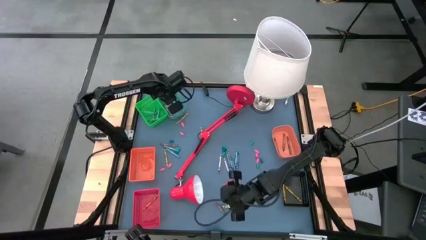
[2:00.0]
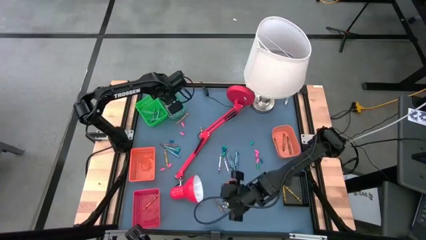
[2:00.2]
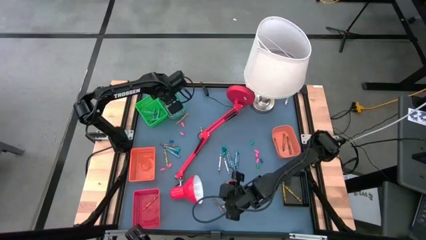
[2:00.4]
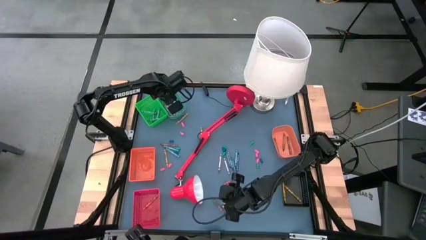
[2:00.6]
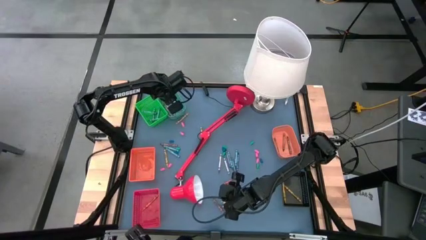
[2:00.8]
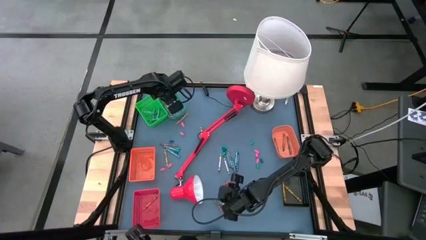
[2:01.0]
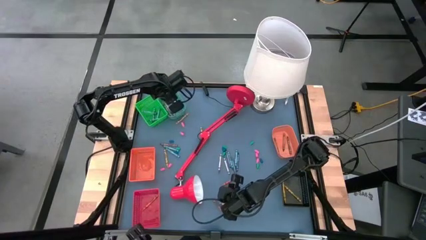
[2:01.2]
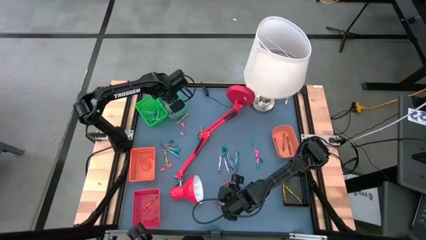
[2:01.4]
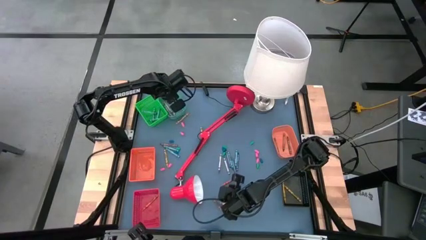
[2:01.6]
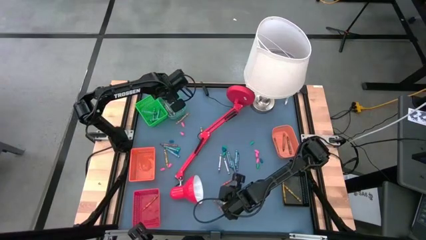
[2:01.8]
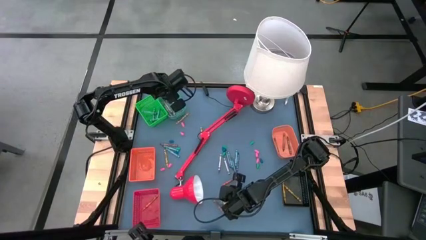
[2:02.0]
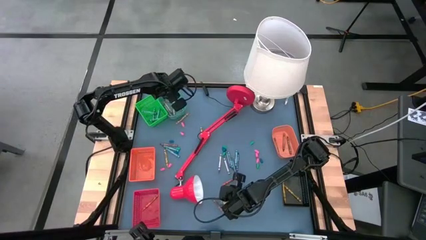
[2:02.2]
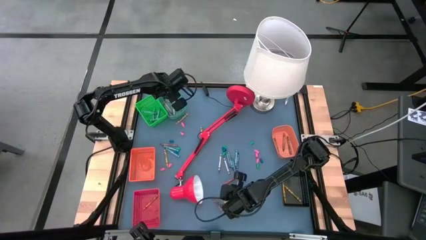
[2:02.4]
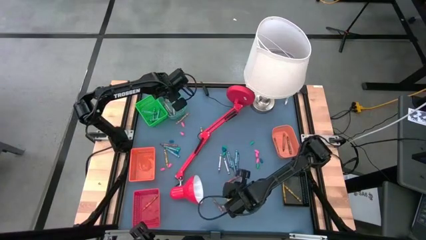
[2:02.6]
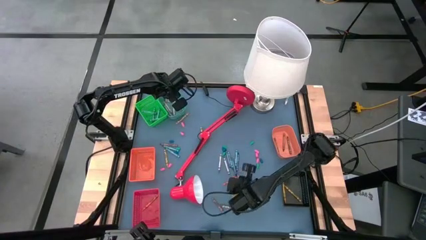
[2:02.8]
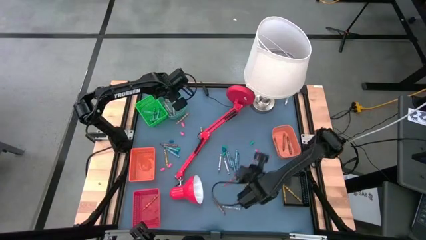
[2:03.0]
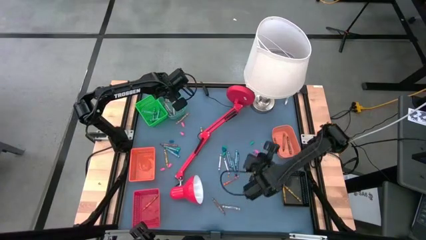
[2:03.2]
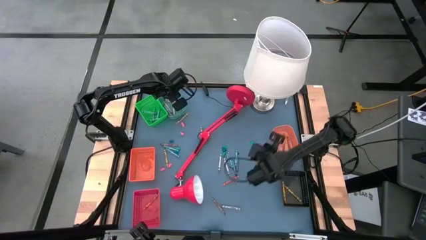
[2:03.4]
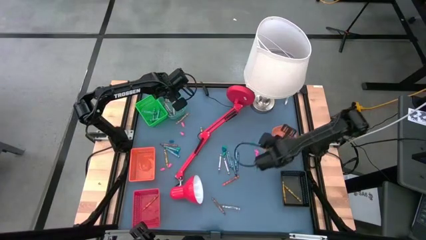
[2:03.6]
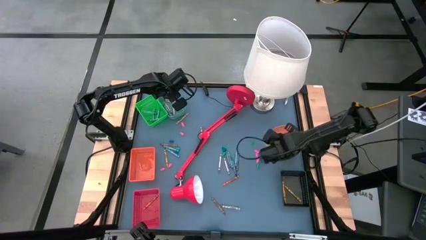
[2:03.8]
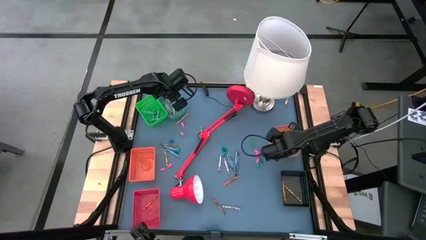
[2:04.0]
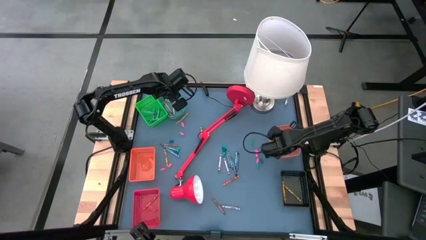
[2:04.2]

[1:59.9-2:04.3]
Task: Sort crayons
Put the bottom right brown crayon into the right orange bin

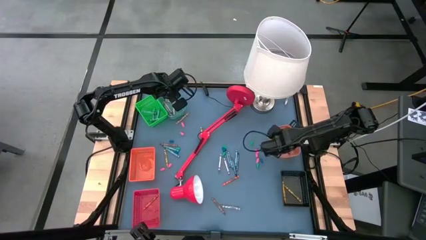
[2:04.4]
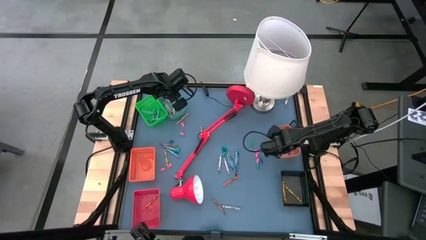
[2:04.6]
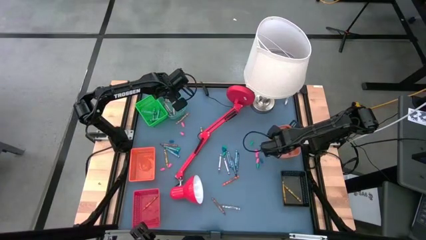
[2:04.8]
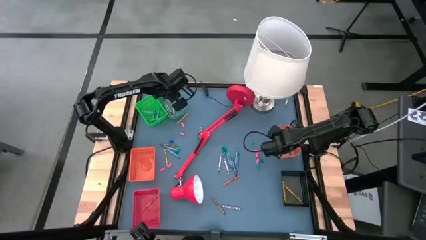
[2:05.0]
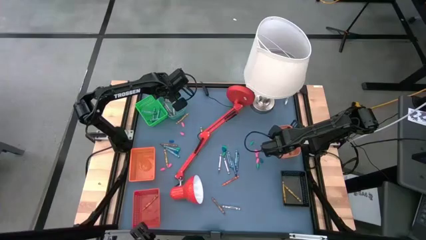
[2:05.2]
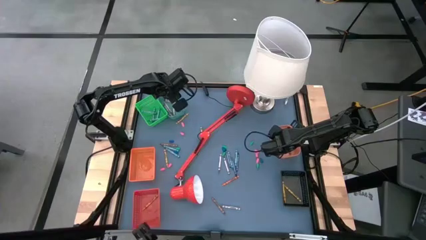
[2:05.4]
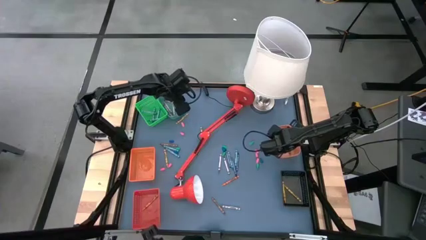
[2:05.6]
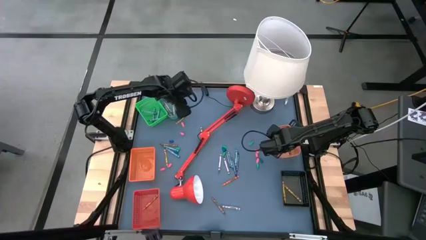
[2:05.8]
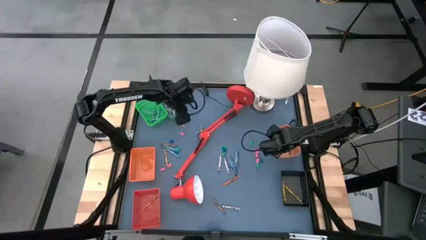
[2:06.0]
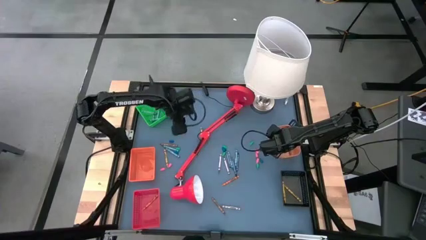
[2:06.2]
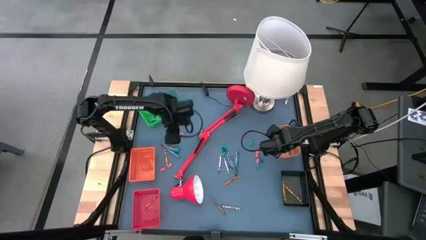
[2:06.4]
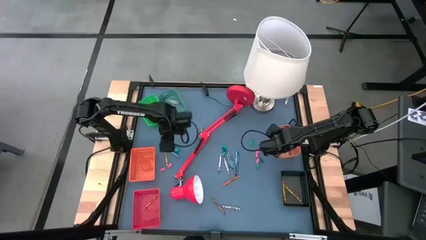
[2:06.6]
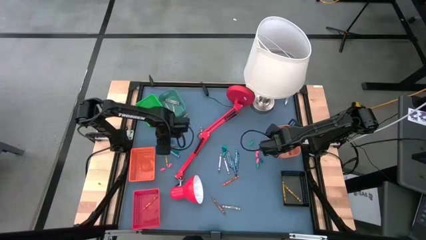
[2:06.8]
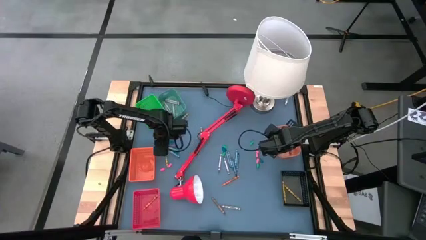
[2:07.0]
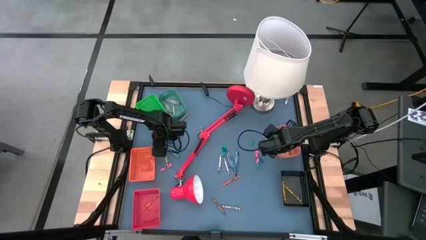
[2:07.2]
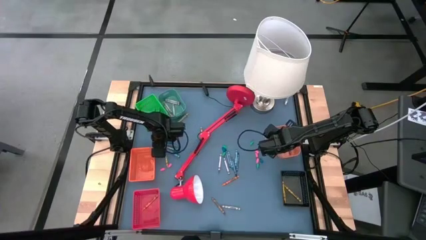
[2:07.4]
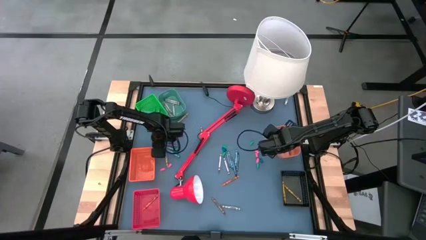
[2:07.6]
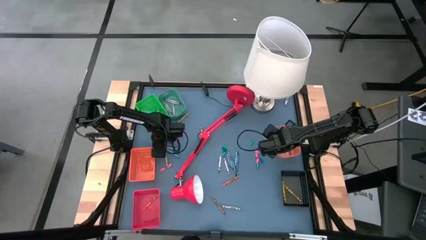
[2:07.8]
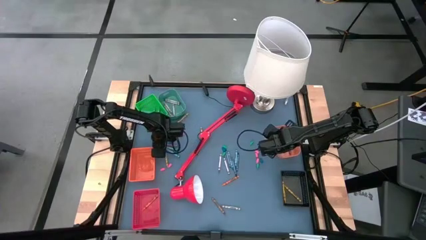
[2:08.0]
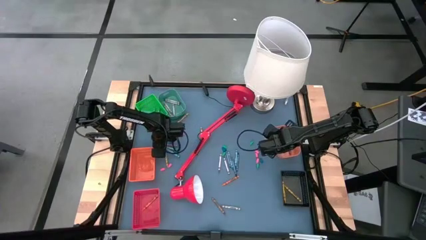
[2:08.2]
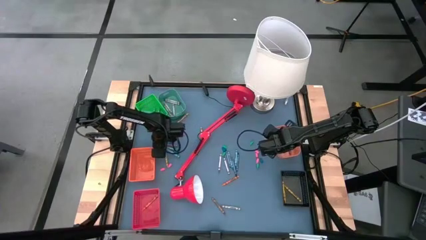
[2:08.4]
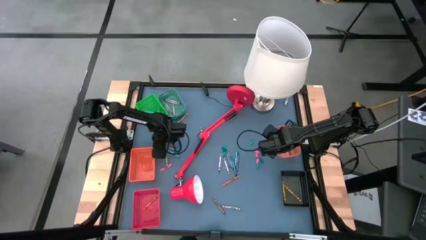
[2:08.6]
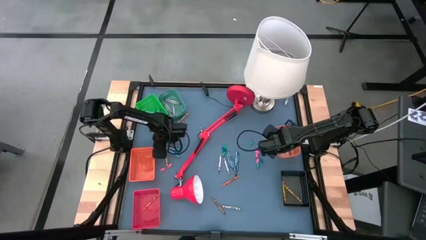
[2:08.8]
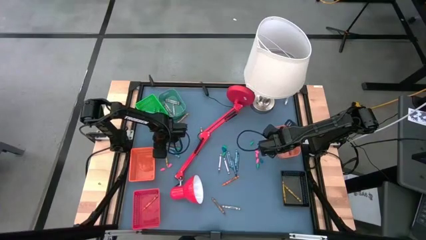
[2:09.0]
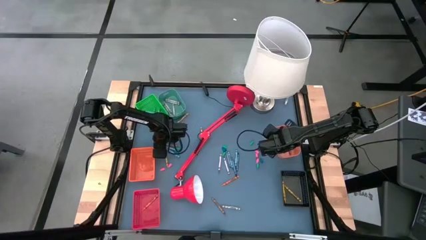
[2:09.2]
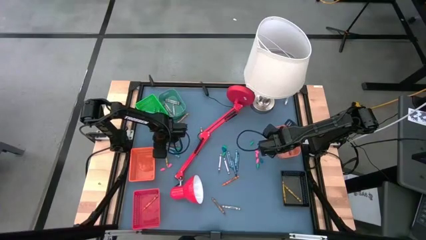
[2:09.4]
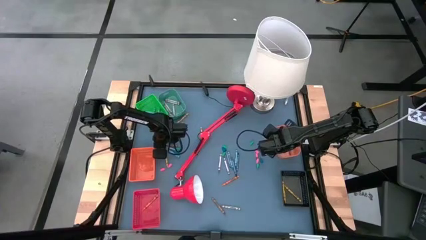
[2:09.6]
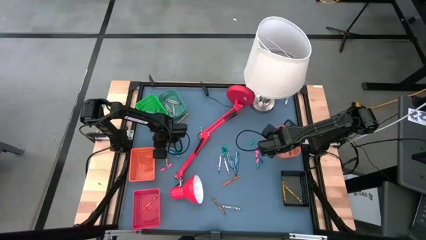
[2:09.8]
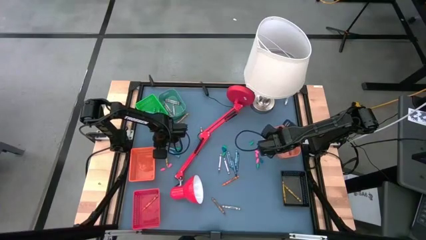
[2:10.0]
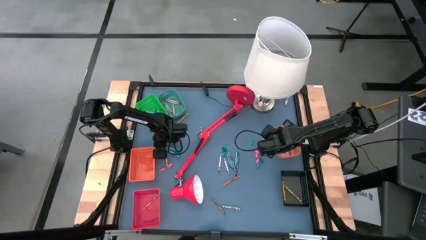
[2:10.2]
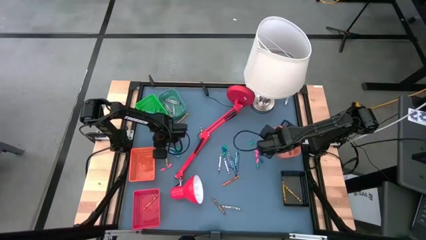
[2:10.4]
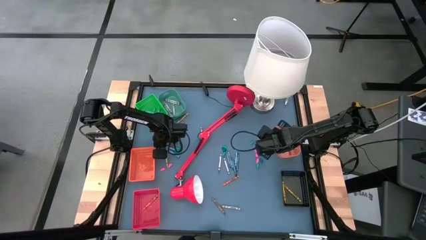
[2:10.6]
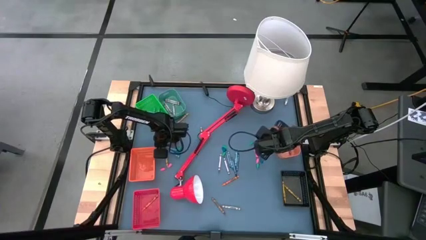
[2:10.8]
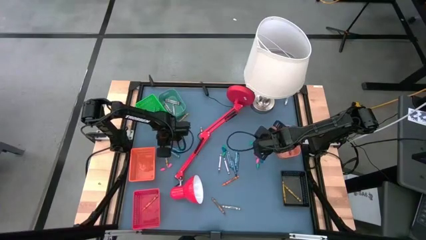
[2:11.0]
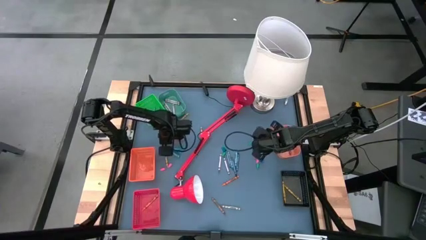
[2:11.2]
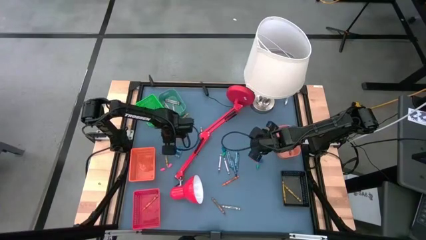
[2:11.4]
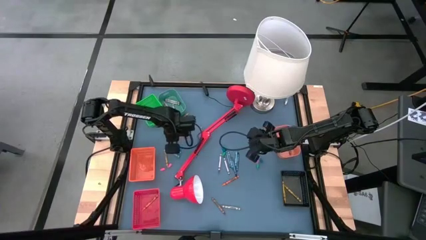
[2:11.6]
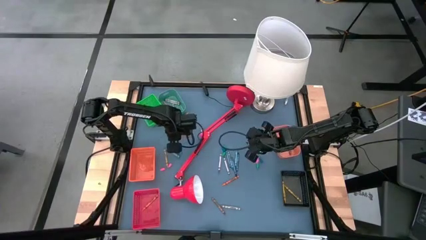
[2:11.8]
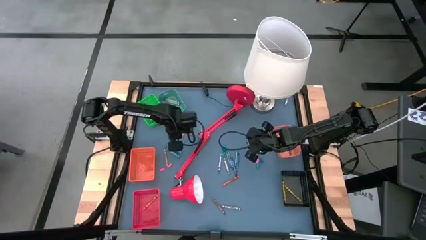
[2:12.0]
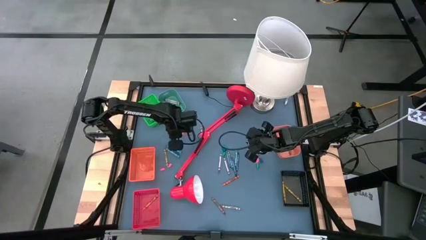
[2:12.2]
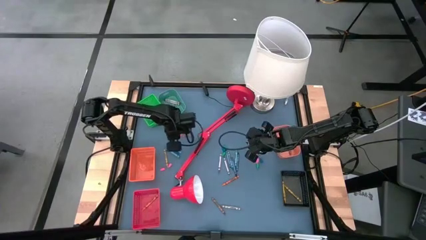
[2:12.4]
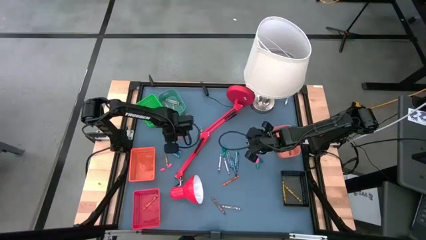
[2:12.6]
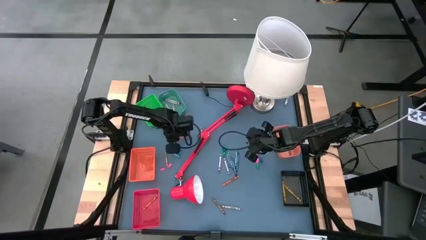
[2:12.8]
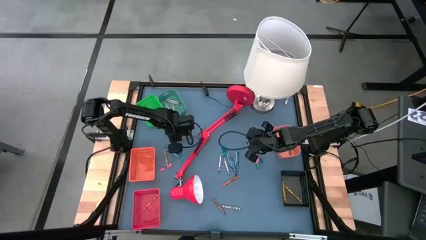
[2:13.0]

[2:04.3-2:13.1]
Put the top brown crayon into the right orange bin

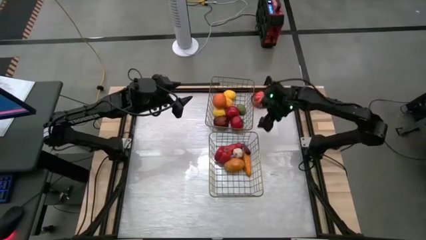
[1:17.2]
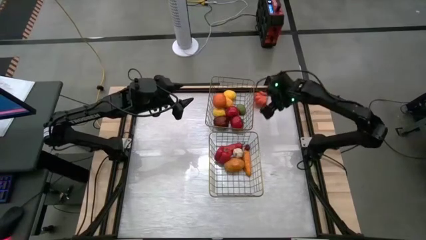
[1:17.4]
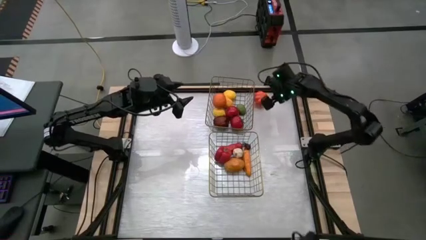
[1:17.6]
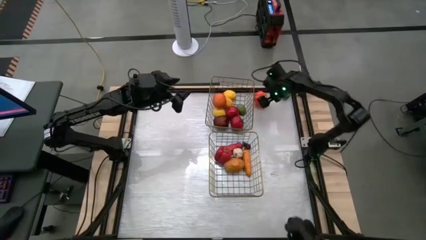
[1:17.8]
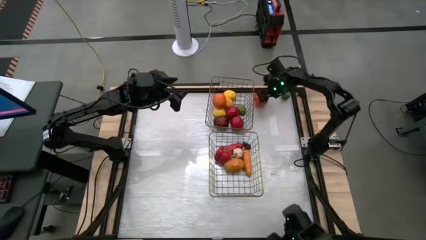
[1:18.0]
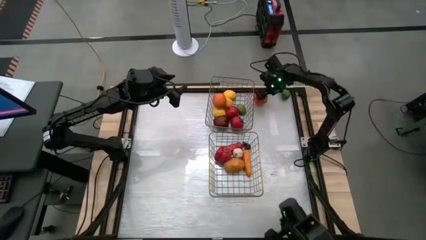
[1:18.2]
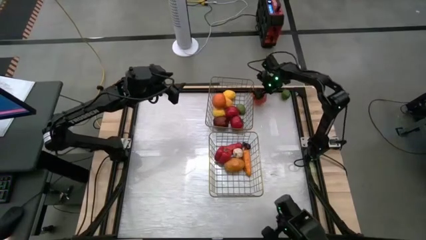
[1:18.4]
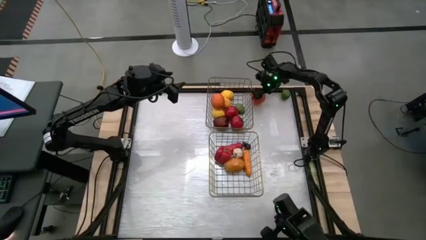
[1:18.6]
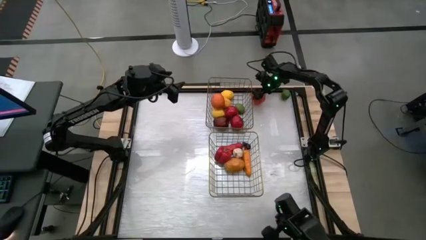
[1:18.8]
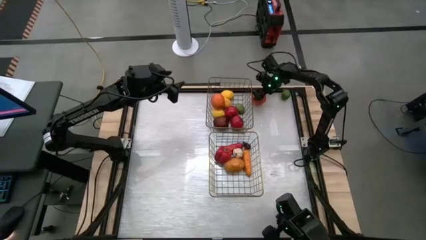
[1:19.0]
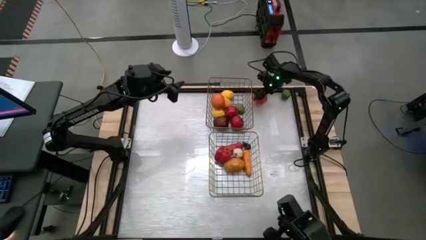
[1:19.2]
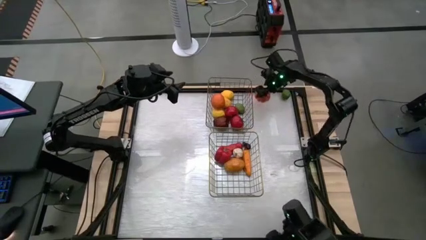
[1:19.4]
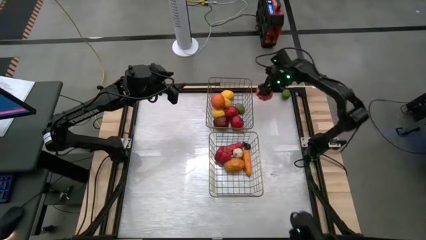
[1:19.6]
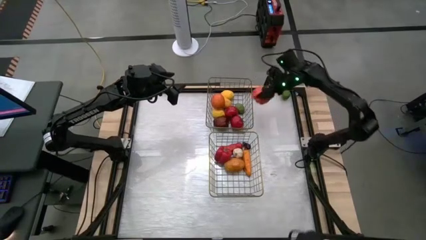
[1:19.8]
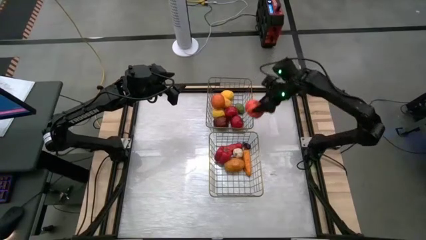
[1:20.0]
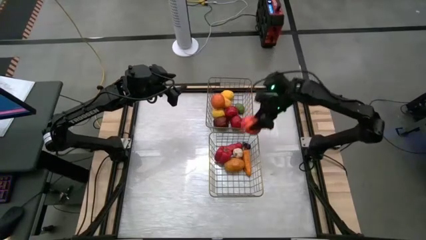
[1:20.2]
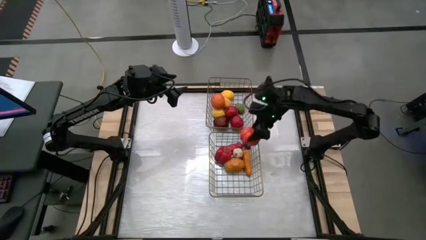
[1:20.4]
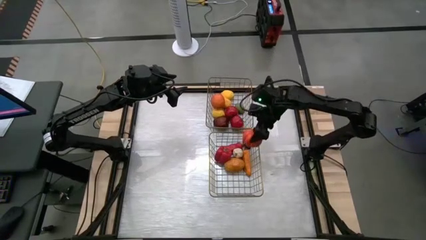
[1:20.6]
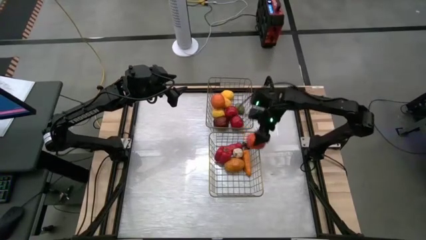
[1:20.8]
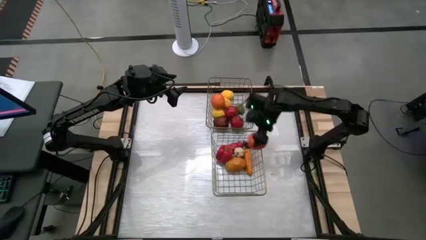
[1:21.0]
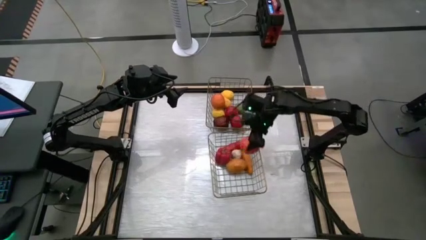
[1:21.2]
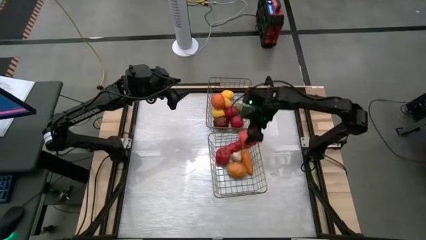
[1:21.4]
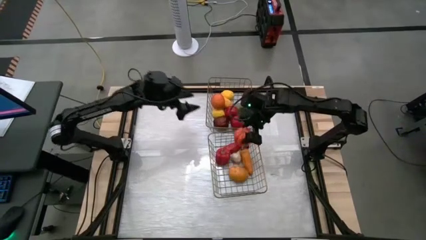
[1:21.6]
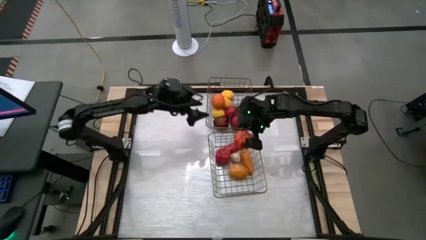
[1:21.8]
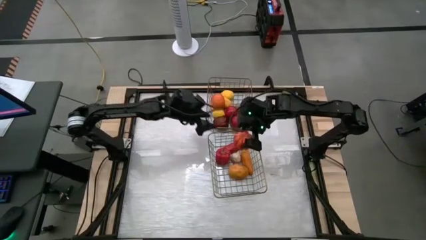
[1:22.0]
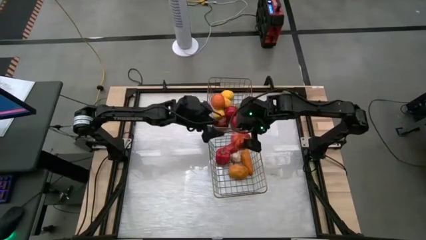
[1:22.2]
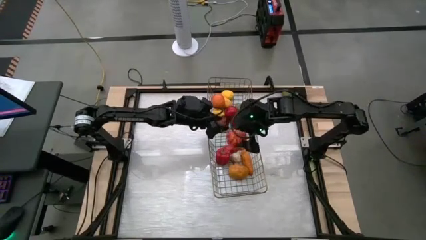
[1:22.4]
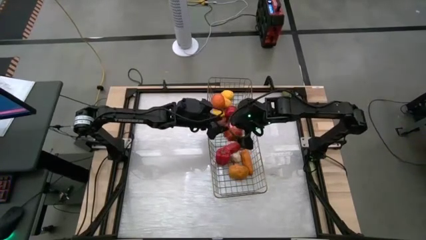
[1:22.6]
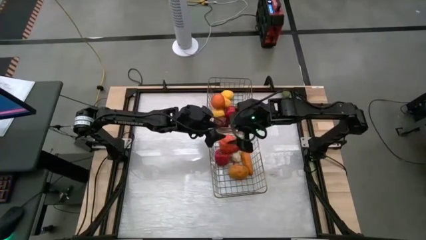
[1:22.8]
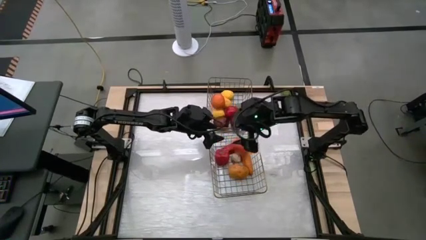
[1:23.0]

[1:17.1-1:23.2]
Task: Sort produce into baskets
Put the orange bell pepper into the bottom wire basket
